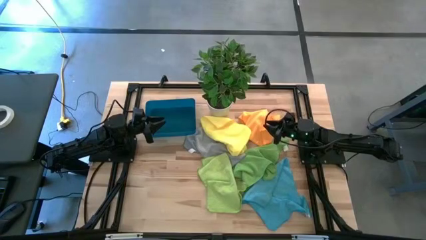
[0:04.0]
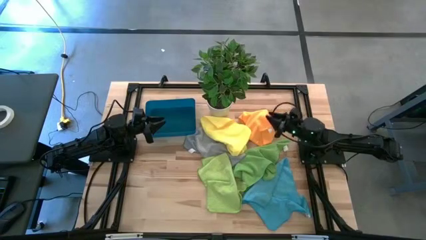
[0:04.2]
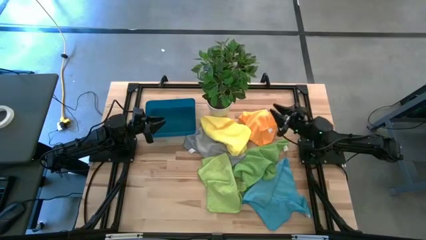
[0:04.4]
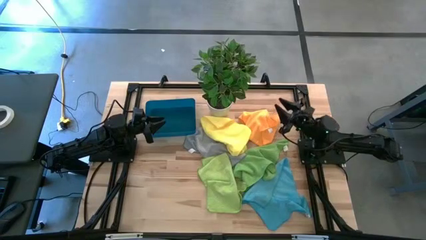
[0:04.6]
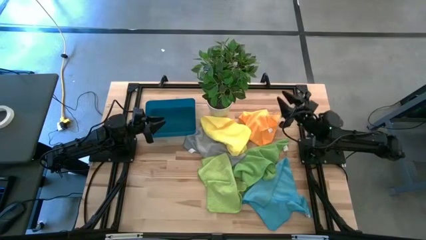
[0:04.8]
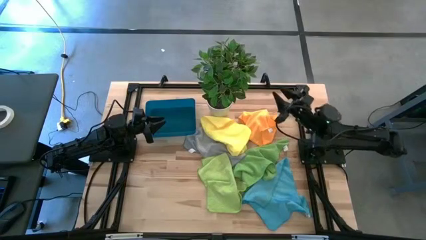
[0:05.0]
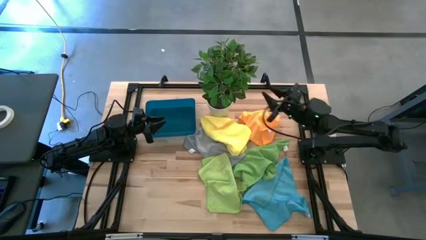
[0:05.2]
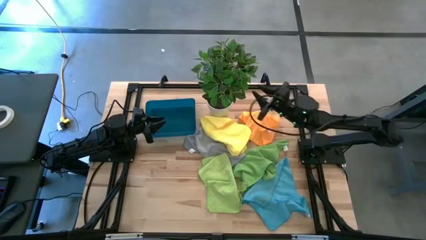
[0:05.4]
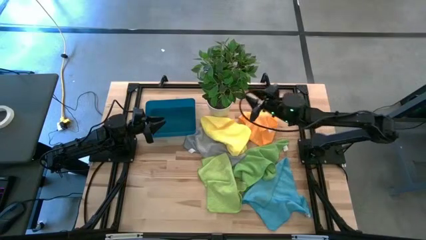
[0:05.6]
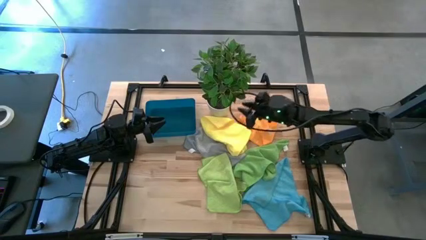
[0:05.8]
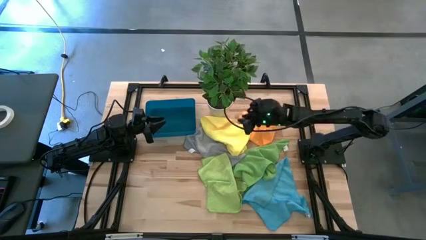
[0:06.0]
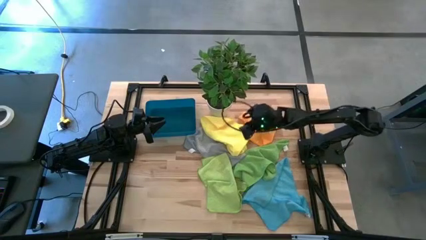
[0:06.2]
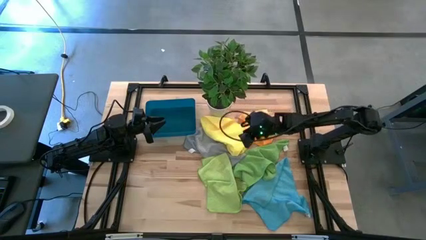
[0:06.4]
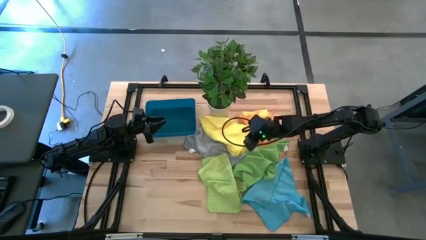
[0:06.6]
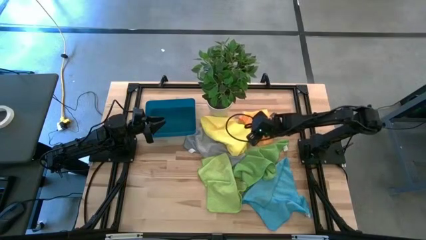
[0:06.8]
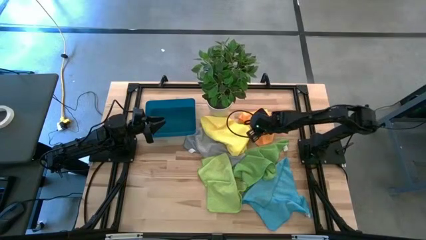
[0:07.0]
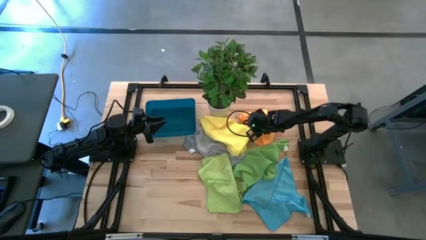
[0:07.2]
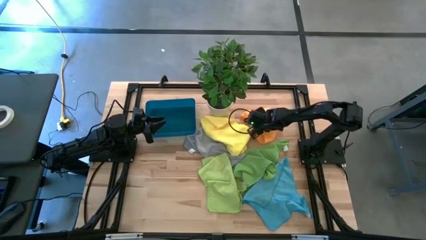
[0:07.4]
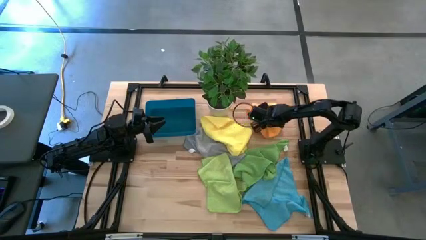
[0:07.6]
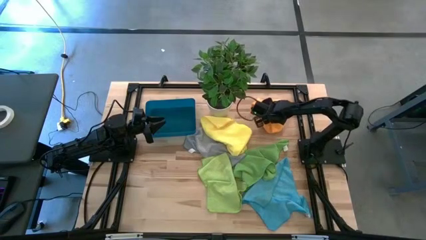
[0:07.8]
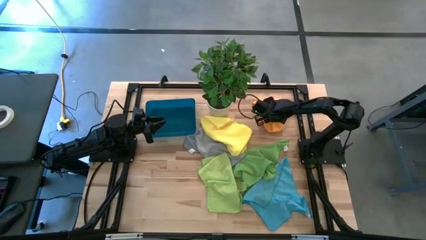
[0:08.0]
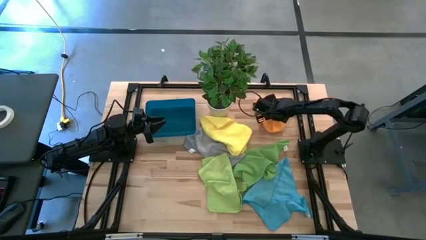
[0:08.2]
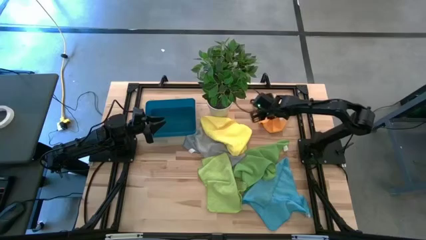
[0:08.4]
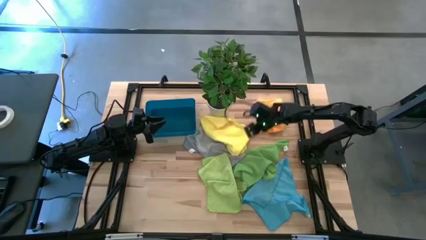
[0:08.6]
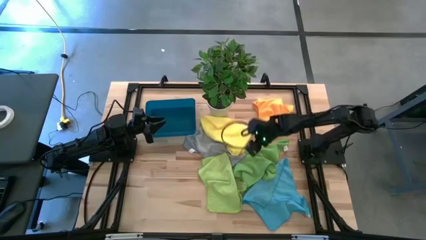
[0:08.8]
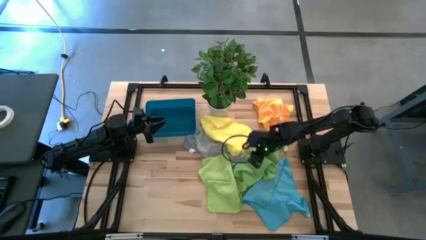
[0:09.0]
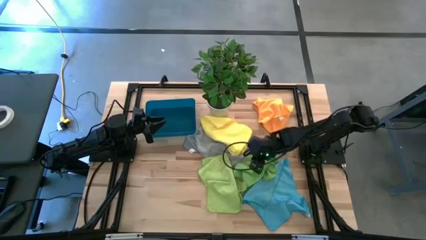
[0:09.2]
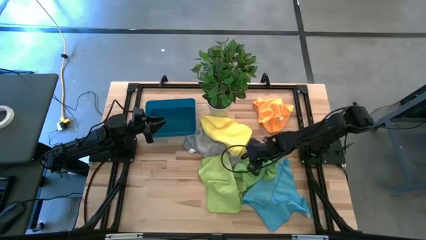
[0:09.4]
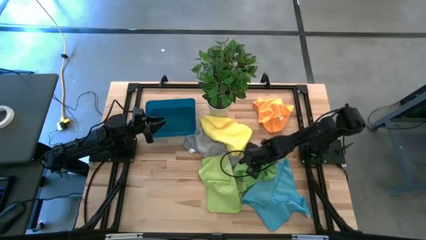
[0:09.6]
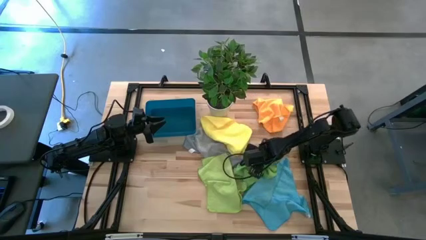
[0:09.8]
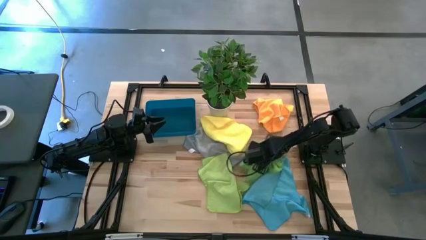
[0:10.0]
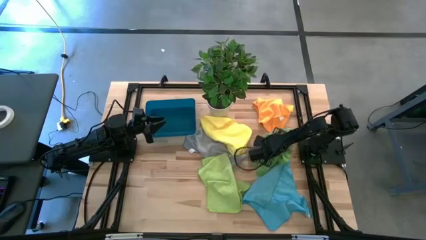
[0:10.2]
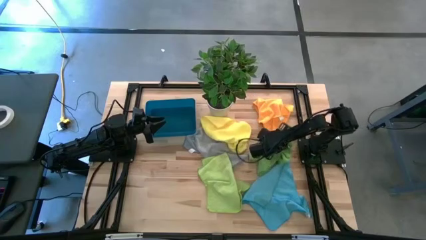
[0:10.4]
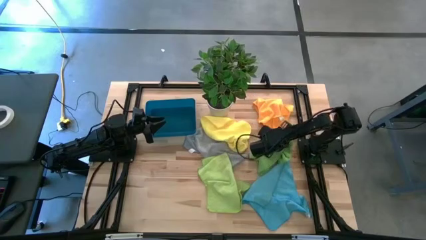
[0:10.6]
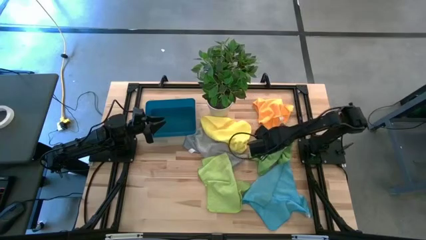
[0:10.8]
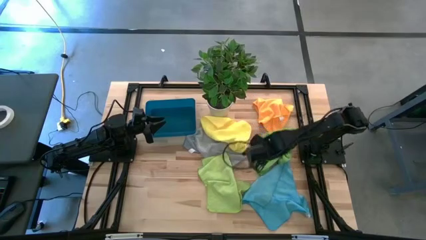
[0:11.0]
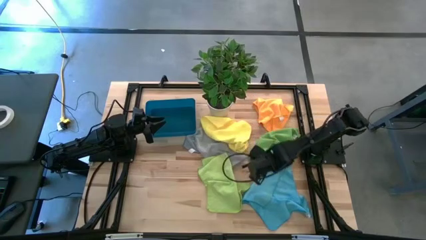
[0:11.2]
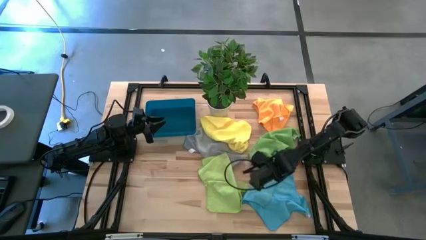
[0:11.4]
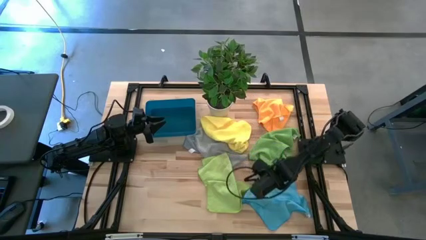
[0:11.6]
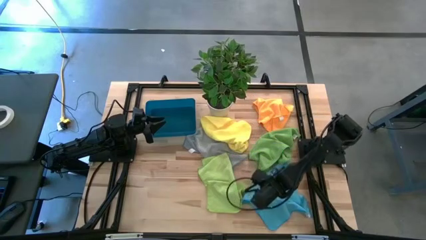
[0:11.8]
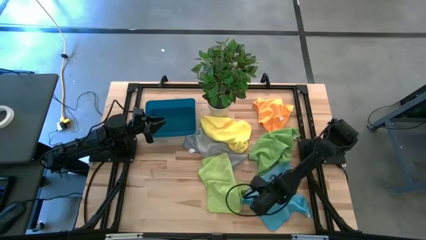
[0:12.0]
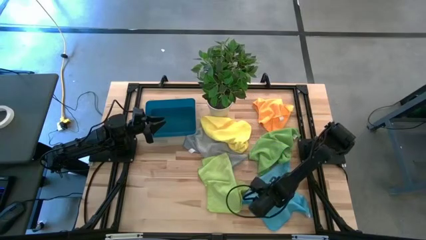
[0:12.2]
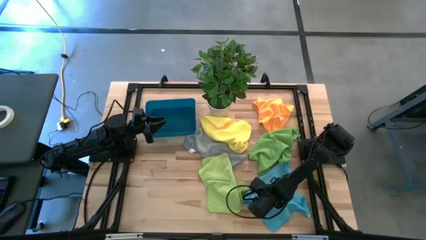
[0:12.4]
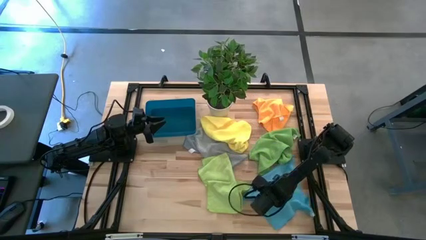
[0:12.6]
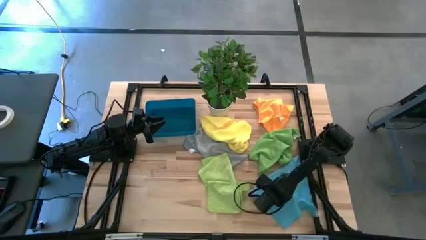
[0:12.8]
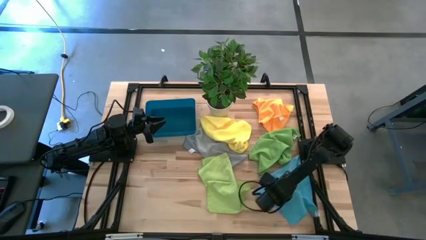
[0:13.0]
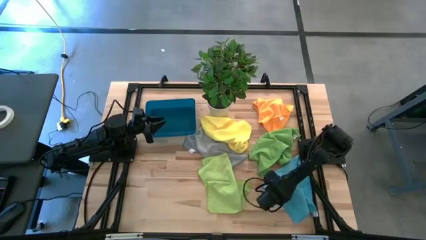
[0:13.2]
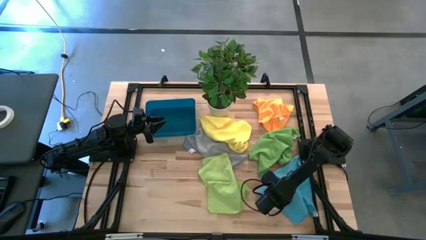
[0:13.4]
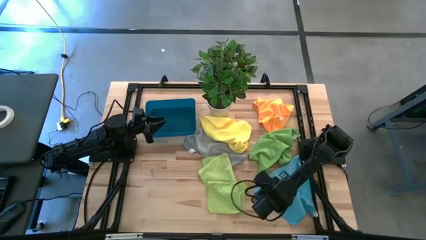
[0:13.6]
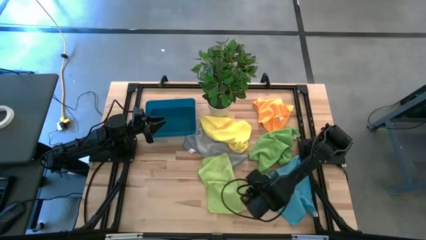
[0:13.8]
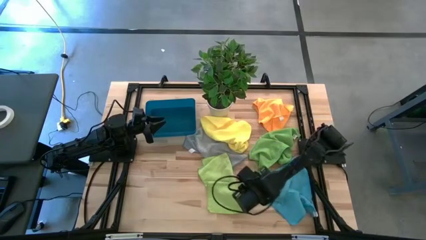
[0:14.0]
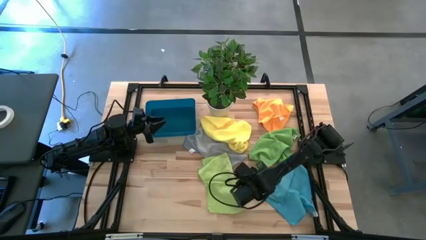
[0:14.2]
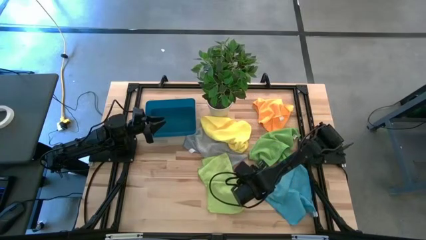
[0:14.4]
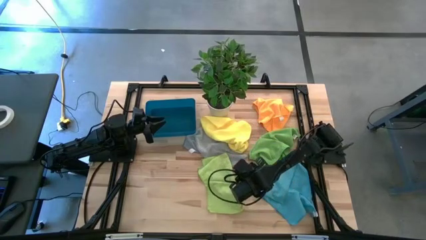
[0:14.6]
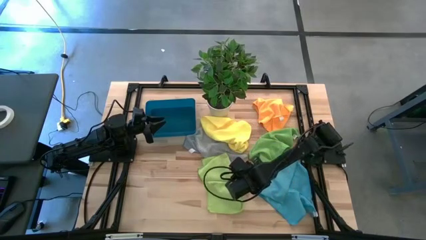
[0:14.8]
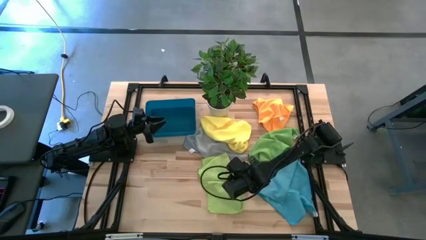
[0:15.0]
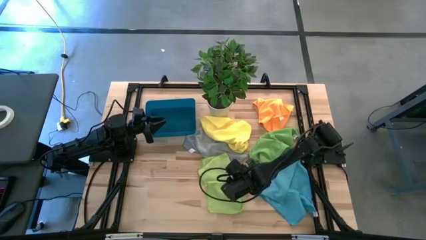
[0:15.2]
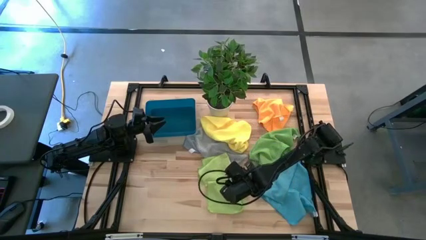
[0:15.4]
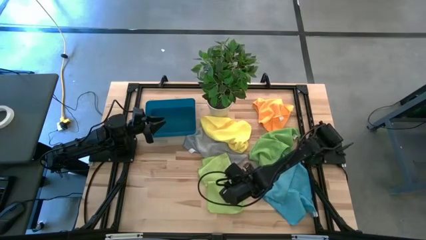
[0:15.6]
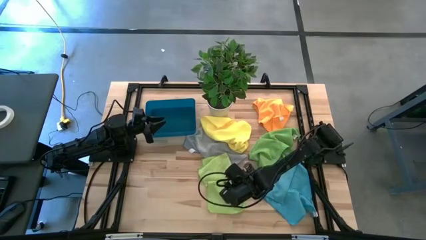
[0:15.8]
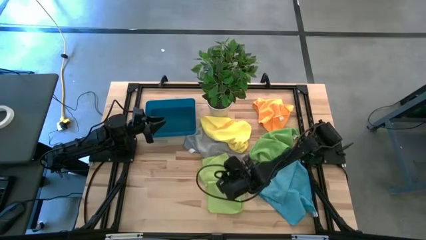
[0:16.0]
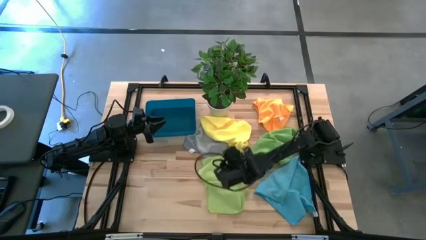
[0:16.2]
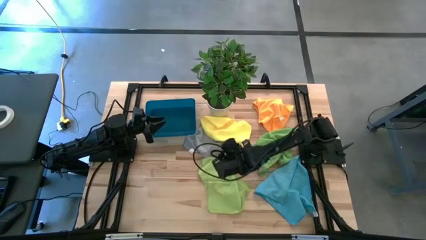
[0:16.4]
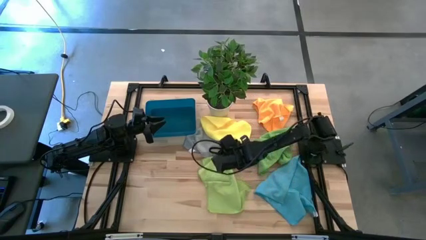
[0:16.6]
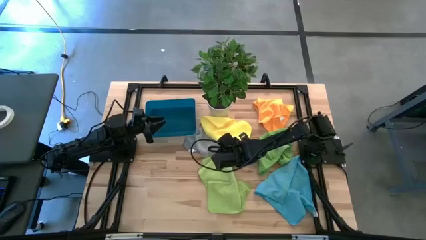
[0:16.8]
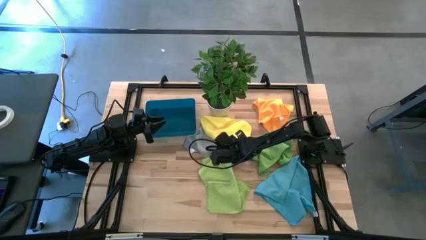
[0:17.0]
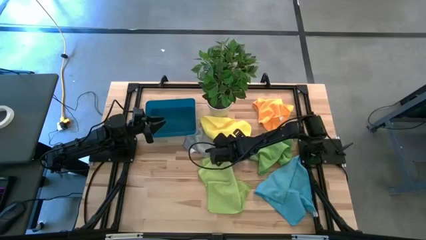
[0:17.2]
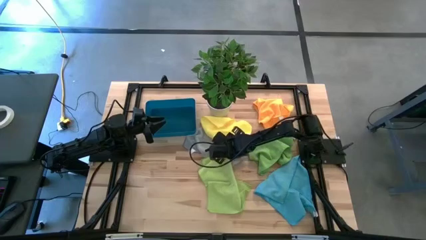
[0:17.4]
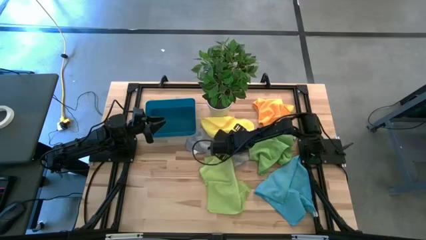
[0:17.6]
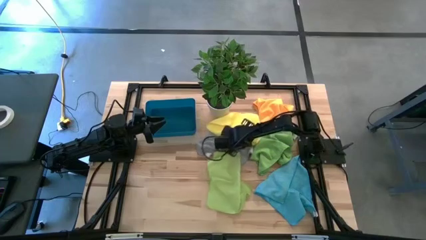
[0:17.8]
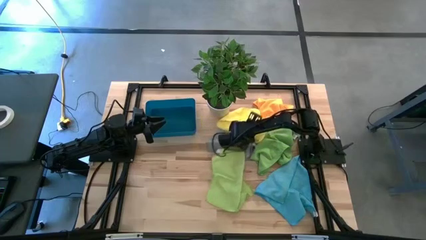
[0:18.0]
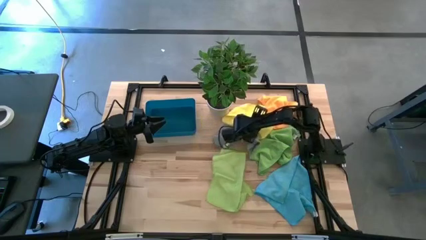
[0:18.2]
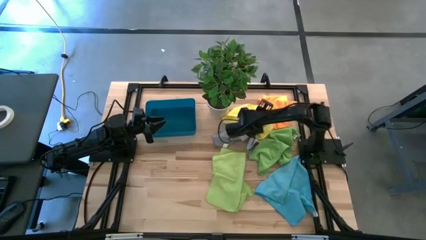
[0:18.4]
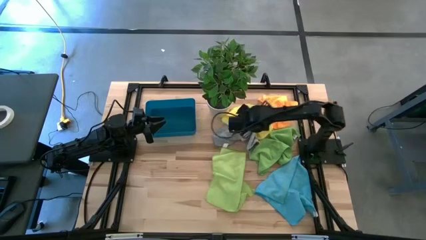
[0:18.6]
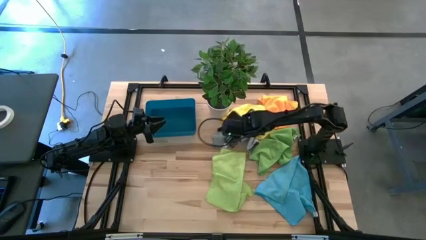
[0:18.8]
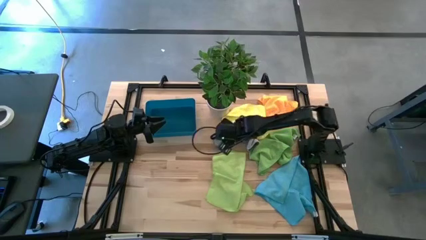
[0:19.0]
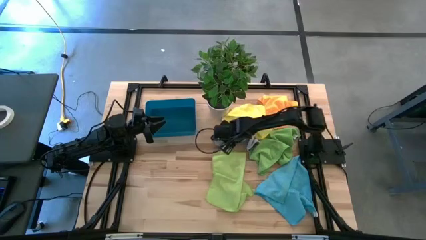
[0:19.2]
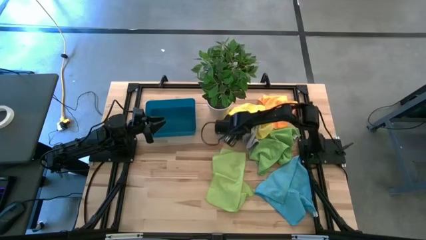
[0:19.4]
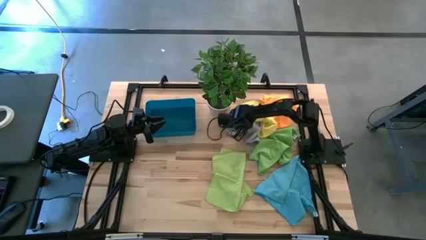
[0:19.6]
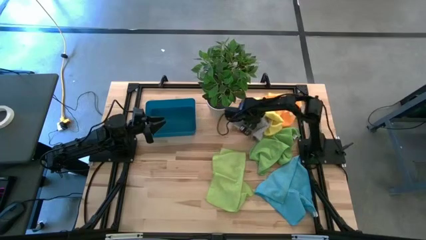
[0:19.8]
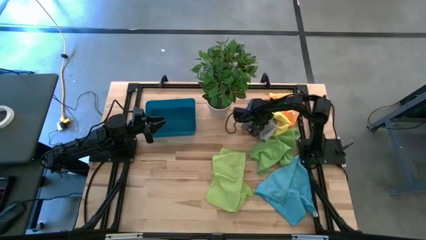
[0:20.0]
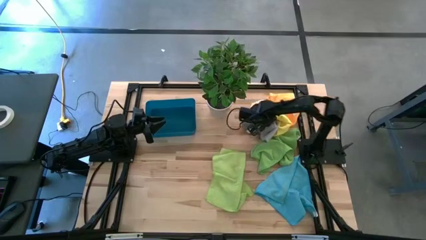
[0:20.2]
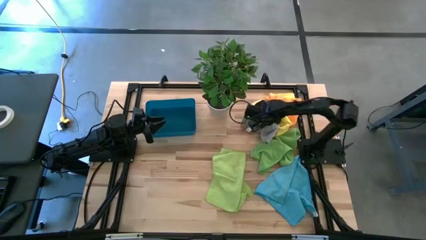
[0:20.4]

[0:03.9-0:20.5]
Task: Fold microfiber towels
Prepare the table to start the demonstration
